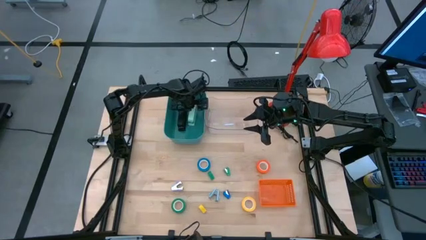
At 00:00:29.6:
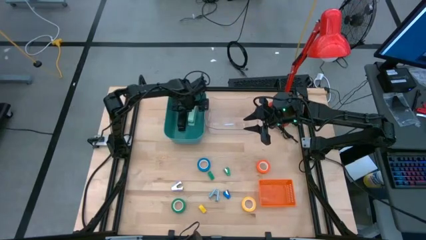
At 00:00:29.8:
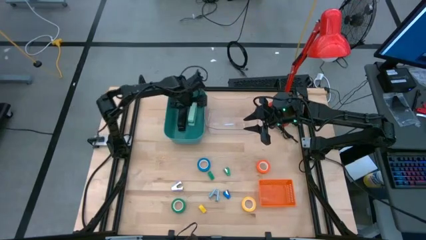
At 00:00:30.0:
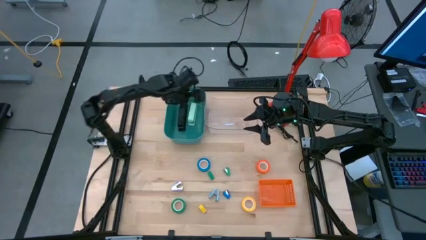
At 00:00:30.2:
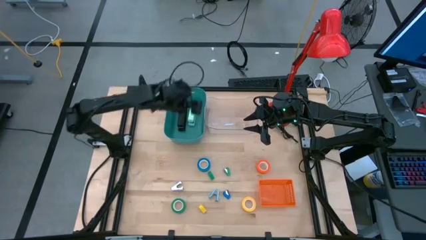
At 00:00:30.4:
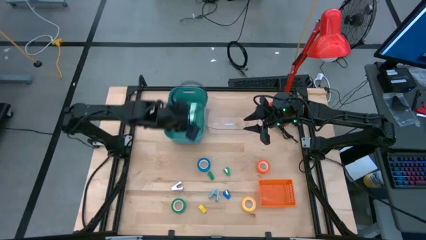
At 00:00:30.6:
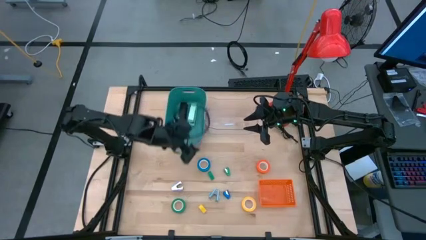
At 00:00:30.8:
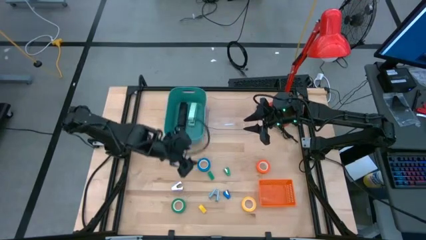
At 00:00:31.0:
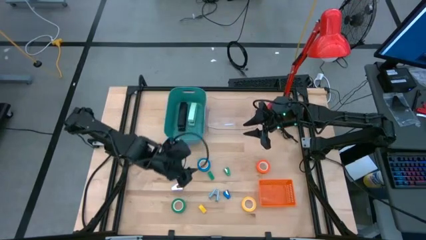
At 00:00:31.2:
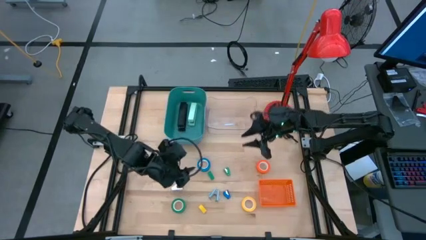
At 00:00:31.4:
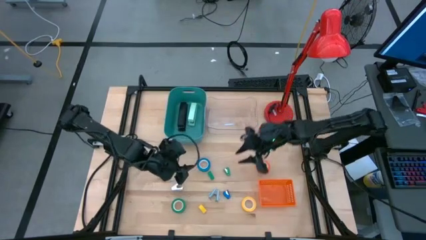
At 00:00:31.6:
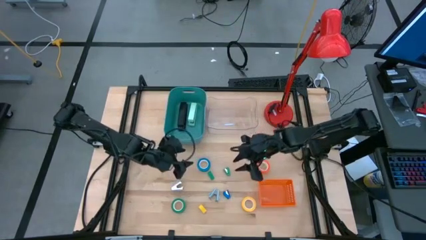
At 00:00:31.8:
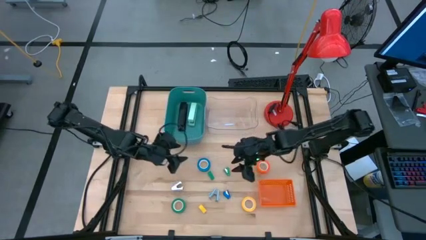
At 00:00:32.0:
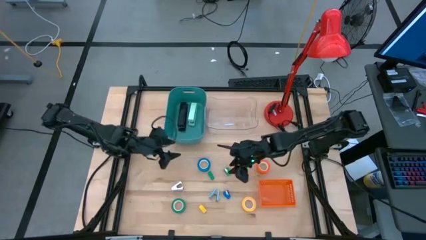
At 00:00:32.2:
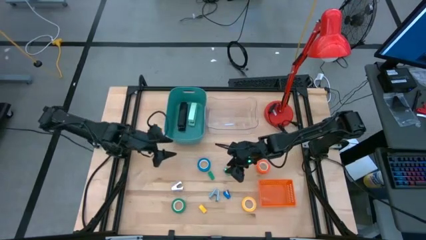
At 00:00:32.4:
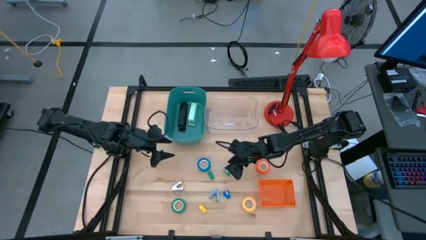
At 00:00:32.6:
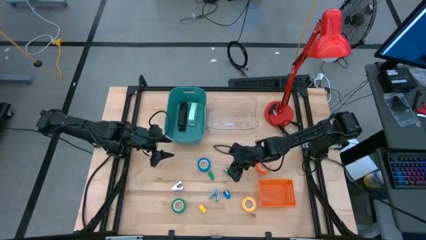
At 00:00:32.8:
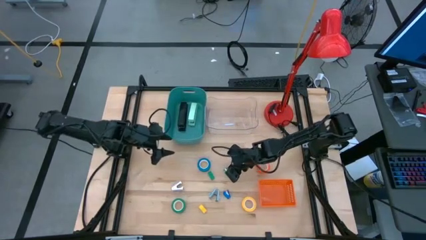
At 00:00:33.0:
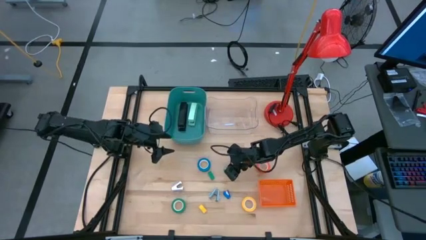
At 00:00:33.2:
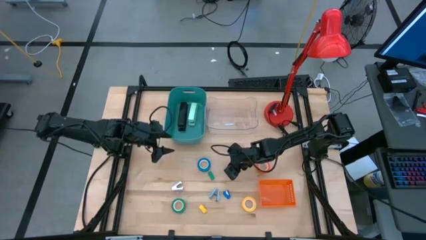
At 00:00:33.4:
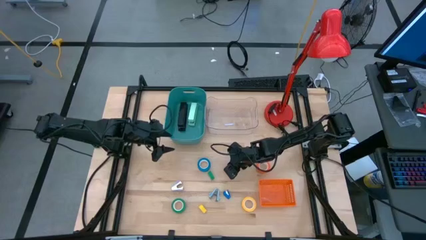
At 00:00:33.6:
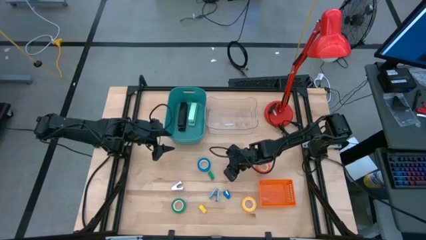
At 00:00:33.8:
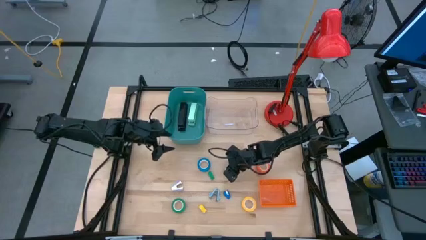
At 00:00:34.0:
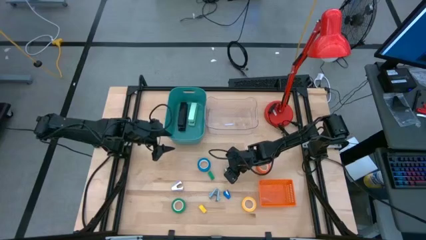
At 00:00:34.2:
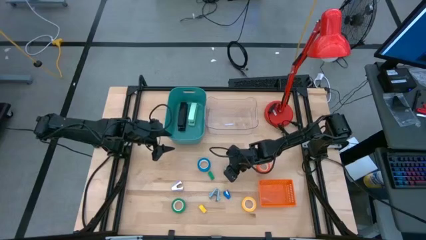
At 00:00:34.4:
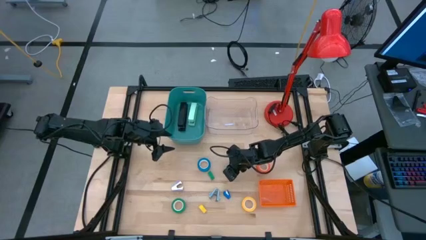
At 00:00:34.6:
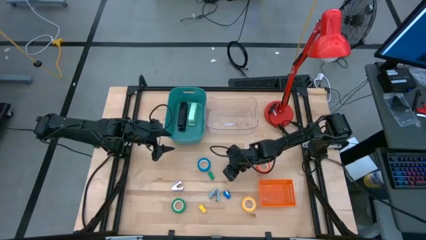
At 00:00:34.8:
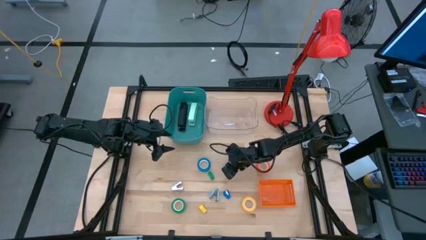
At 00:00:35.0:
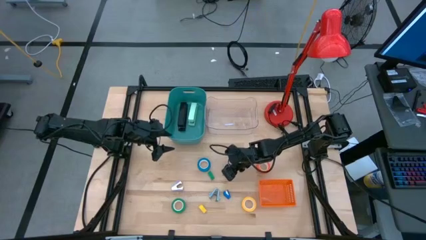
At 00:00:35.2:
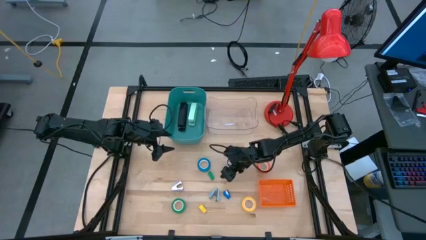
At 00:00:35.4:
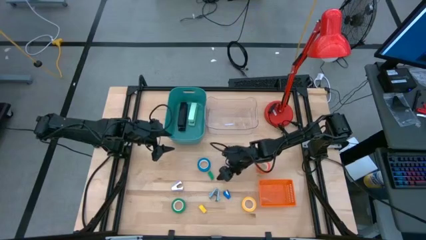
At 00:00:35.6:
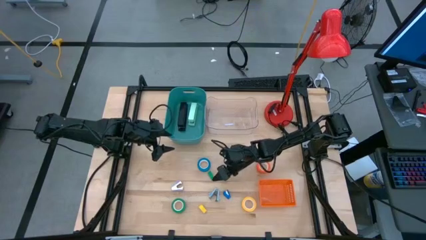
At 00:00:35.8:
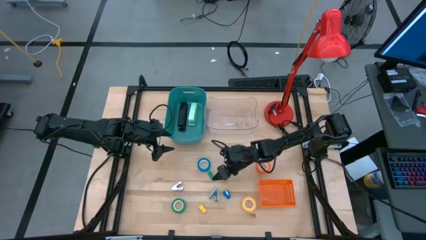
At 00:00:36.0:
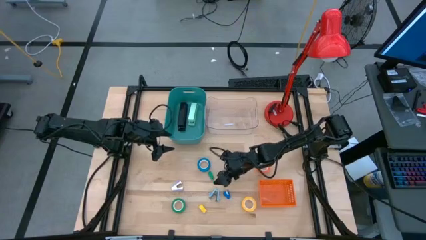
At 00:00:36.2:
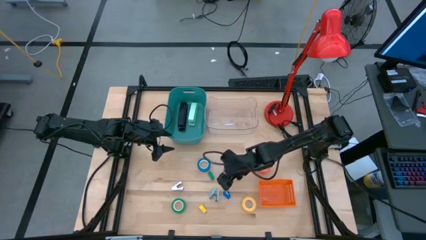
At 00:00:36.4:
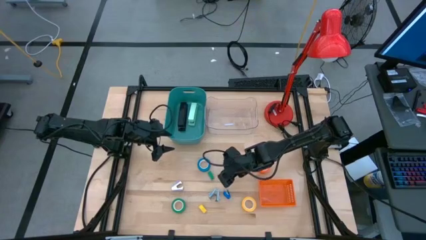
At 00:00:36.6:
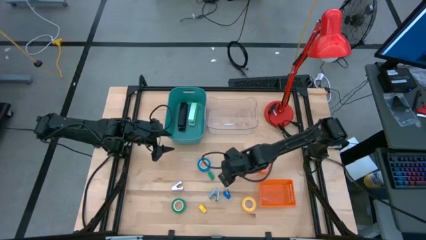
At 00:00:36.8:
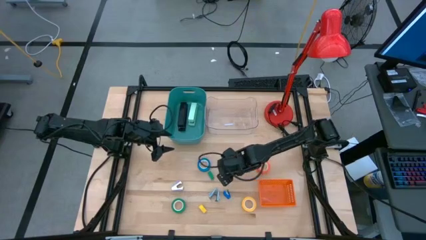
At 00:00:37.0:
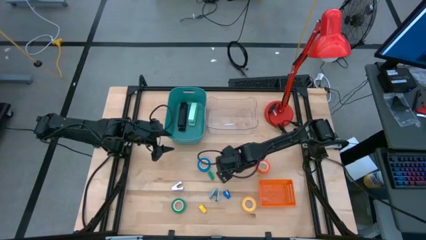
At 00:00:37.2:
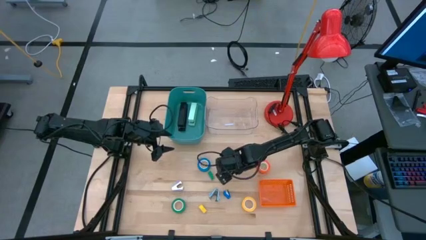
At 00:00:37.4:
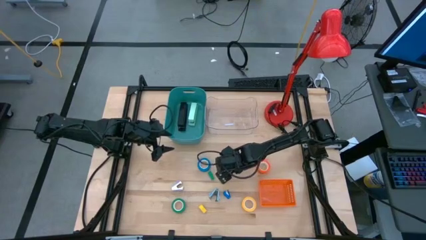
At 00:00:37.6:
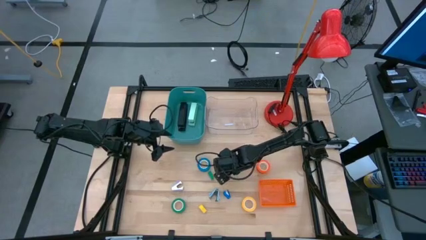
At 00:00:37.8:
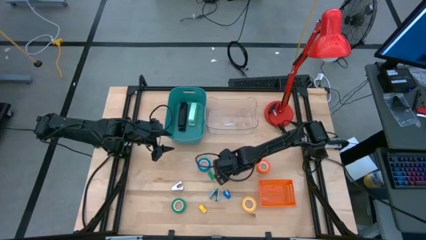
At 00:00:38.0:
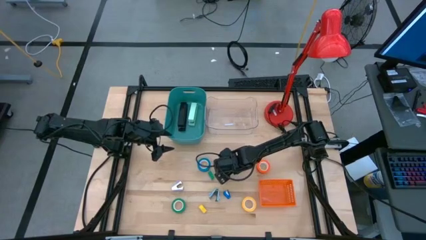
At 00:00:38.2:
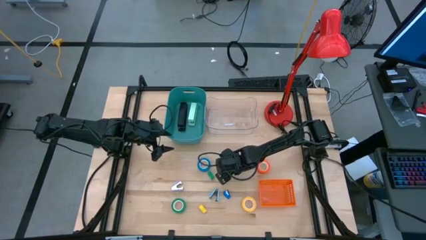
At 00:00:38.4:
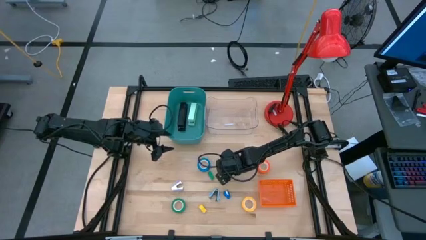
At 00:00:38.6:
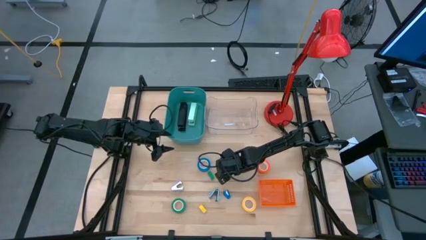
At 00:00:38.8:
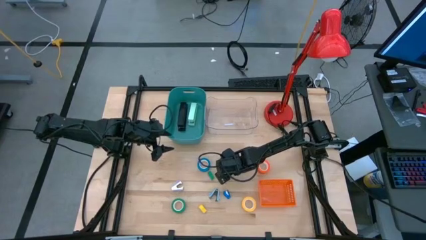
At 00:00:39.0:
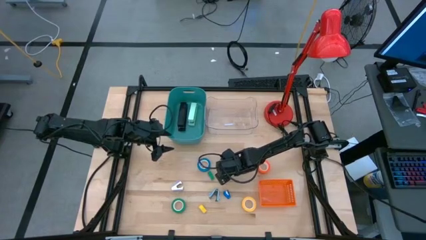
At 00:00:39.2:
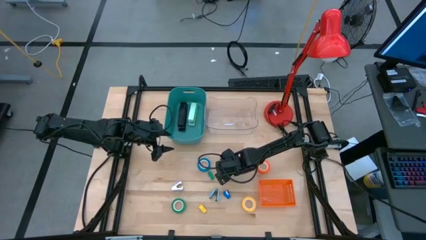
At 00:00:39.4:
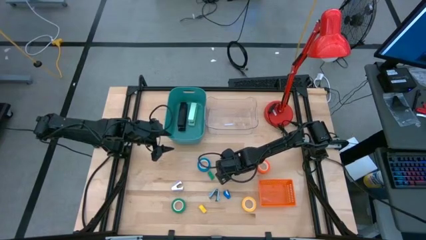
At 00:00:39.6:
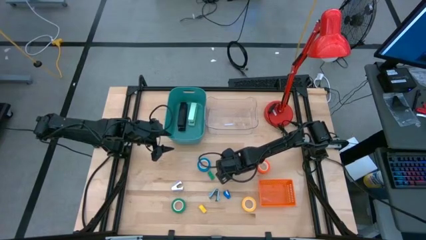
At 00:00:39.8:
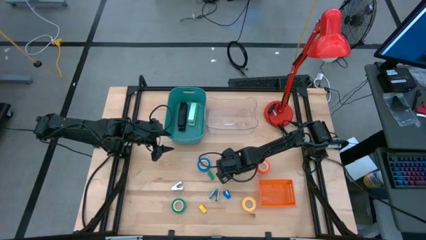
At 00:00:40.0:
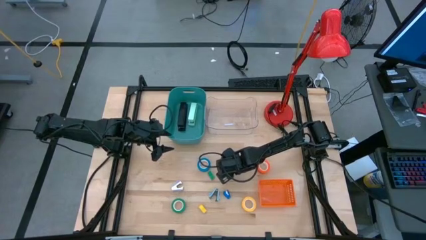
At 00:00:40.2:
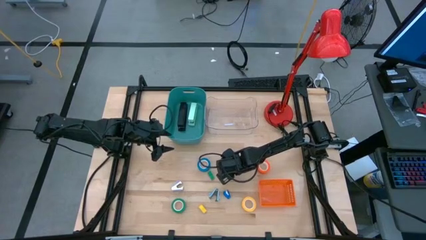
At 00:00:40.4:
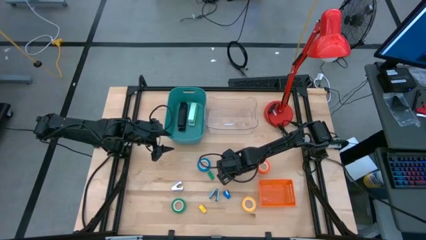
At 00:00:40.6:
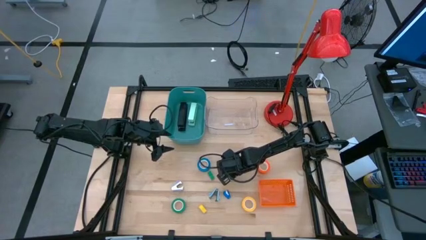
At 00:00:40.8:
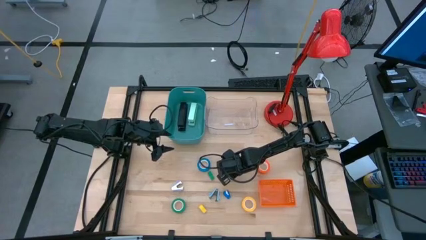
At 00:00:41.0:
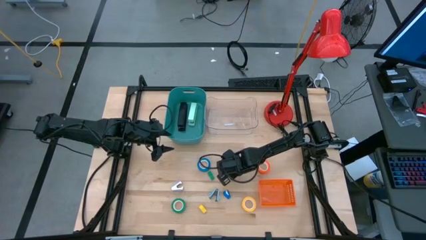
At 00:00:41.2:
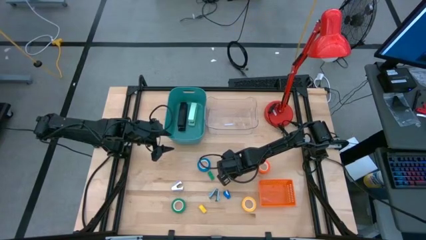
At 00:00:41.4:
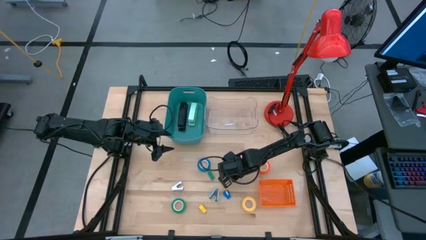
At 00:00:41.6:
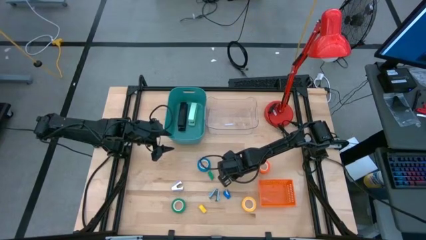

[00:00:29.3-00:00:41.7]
Task: Pick and place Stapler, Stapler remover, tape
Put the right mini green stapler into the blue bin
